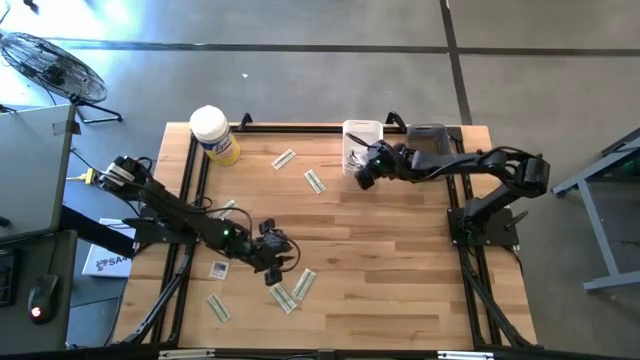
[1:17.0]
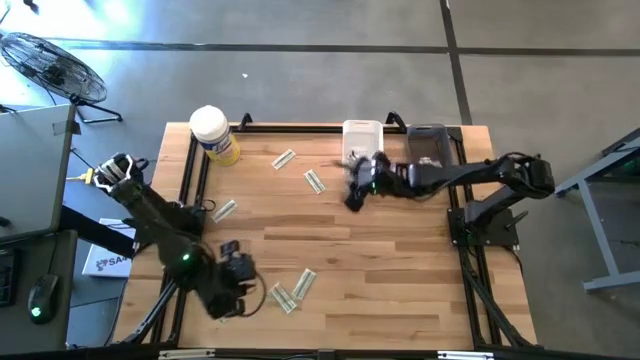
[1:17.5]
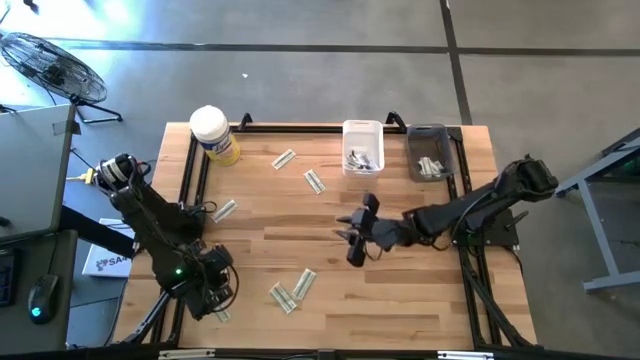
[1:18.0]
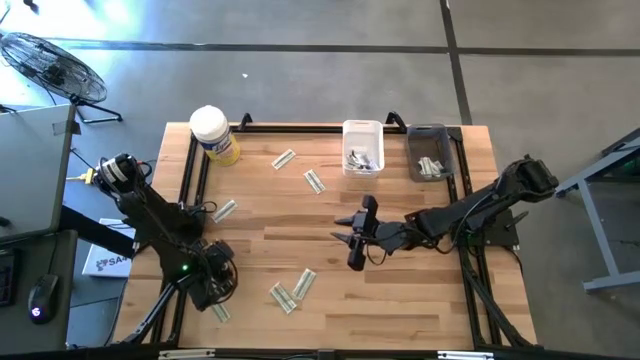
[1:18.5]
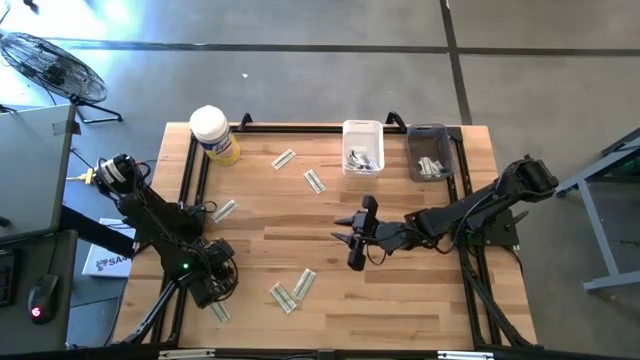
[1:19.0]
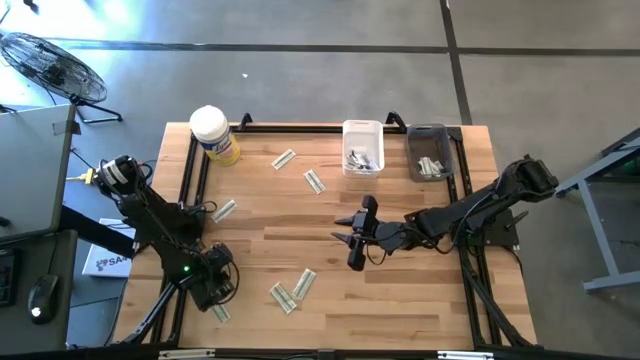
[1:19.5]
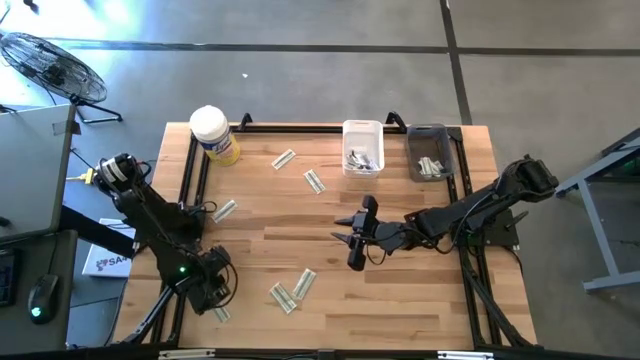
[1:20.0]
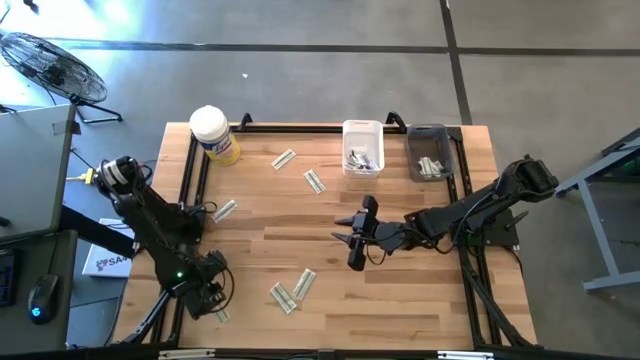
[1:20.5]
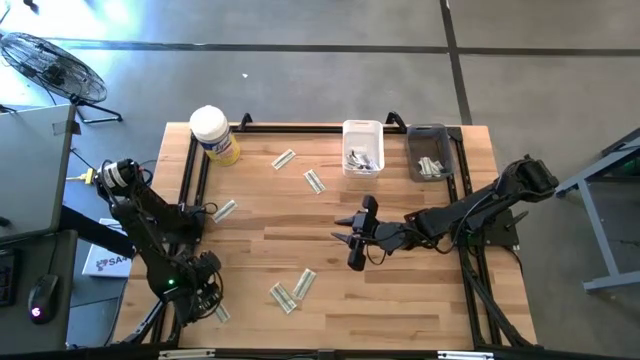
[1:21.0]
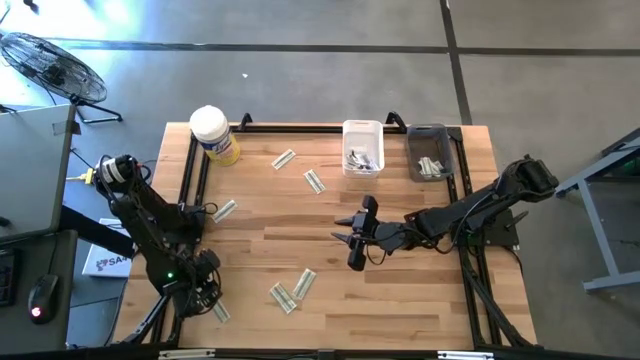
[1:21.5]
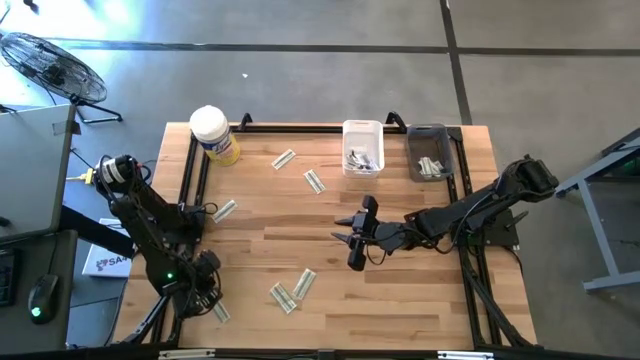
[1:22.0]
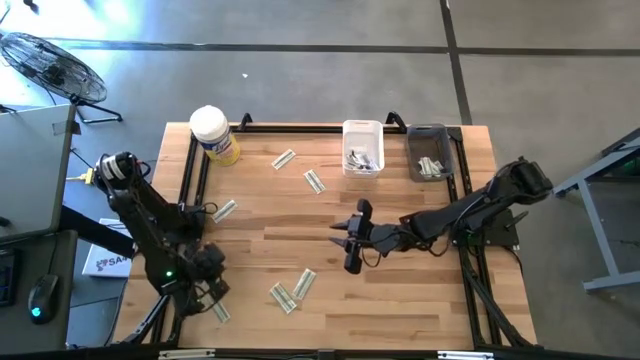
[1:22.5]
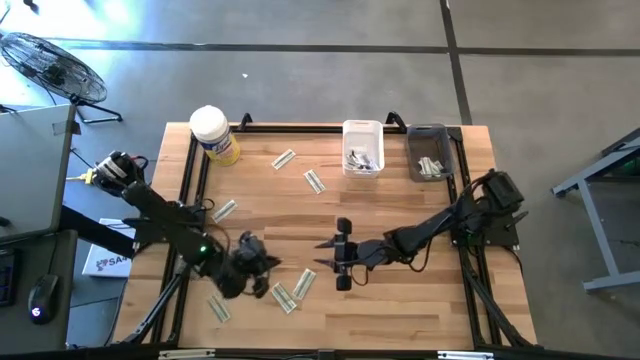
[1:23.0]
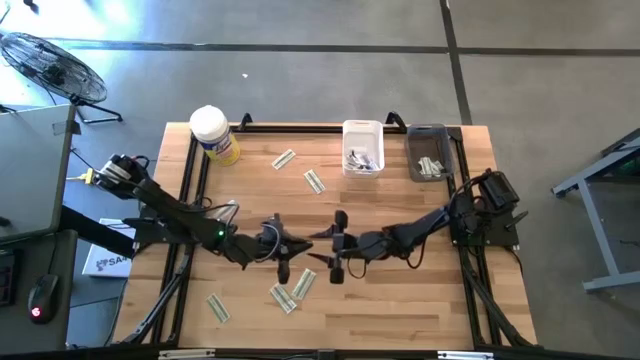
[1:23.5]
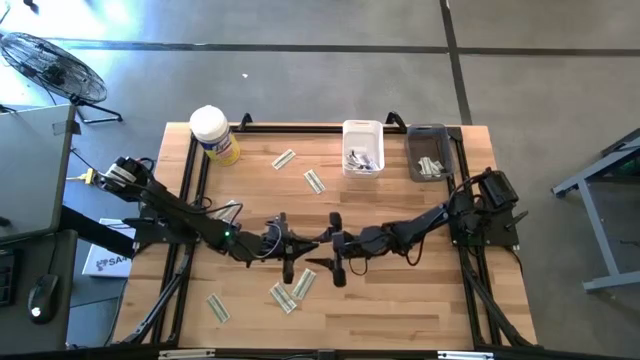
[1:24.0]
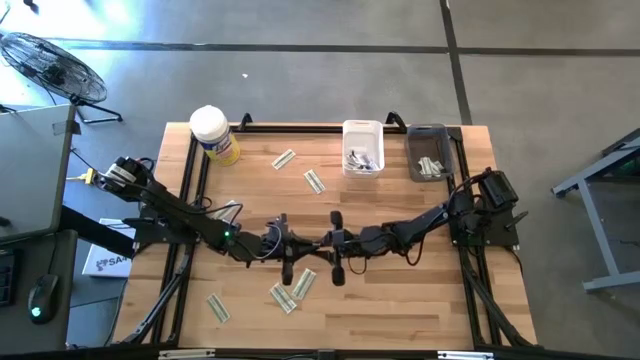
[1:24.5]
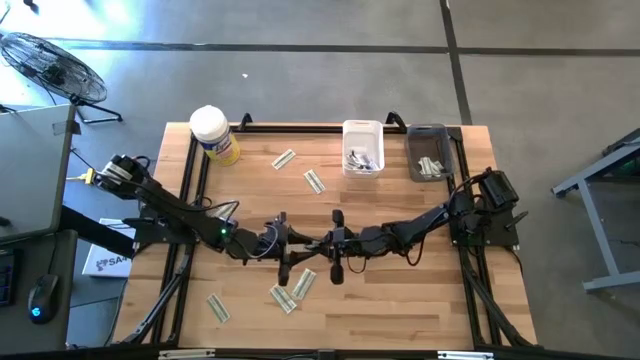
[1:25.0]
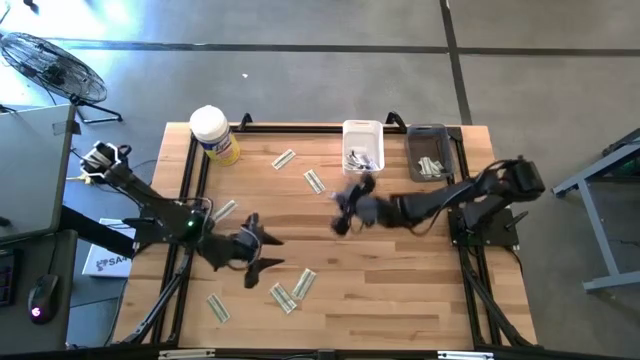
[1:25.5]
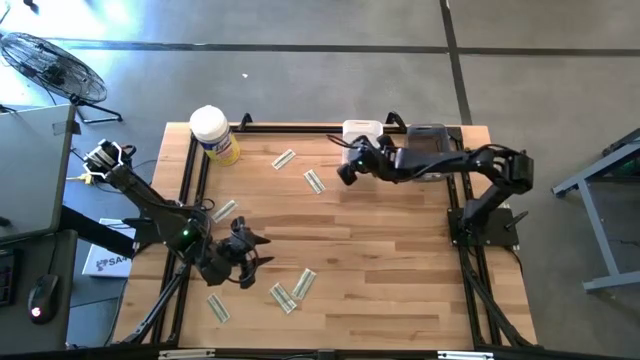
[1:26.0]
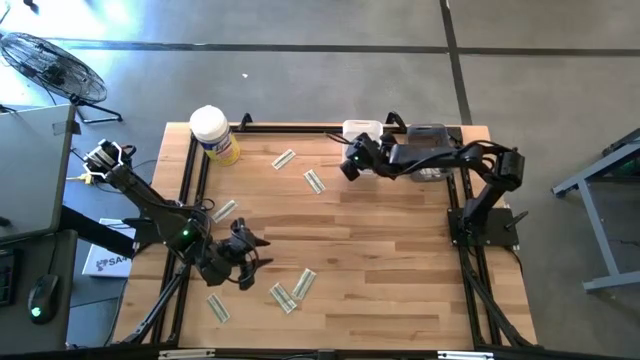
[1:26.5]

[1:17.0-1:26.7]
Task: Pick & Place First Aid Supplies
Put the blue alcohol pad into the white bin

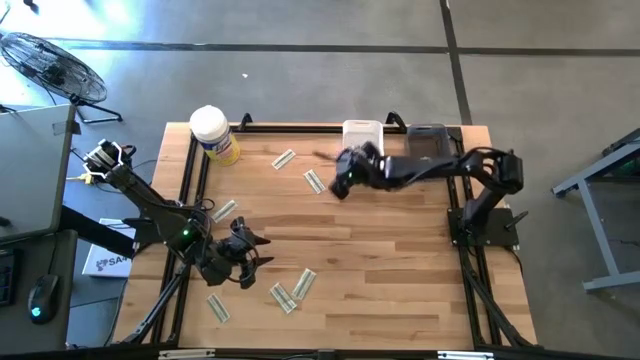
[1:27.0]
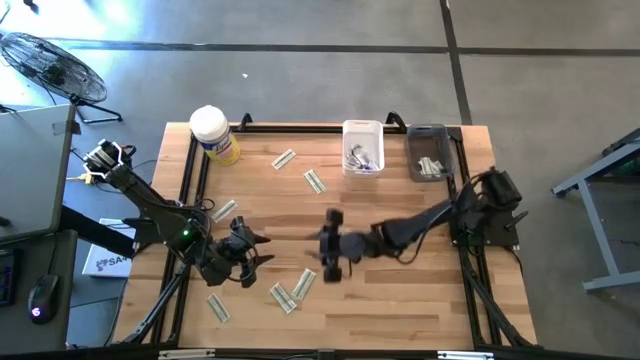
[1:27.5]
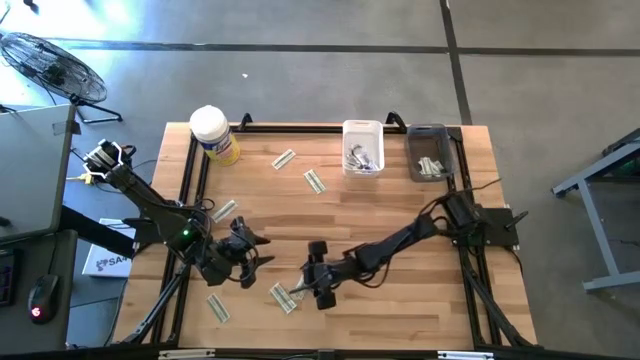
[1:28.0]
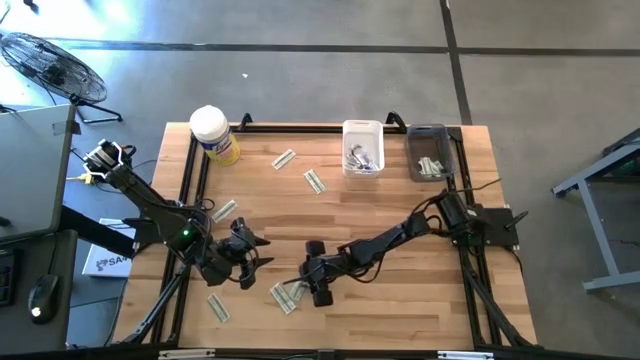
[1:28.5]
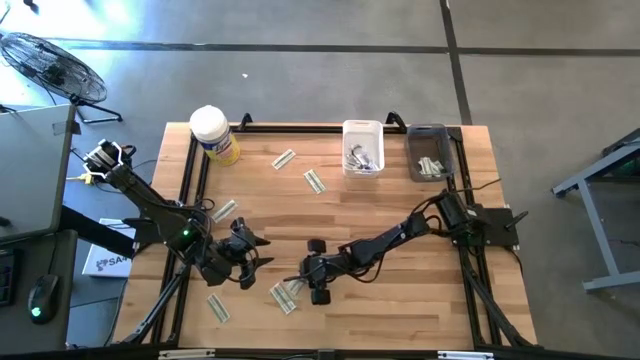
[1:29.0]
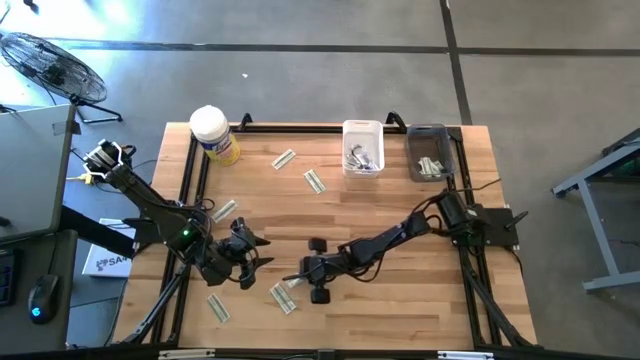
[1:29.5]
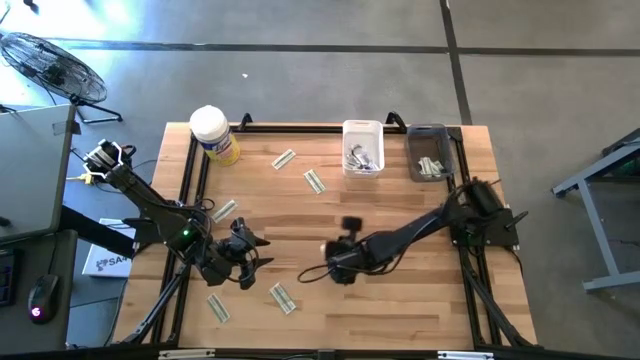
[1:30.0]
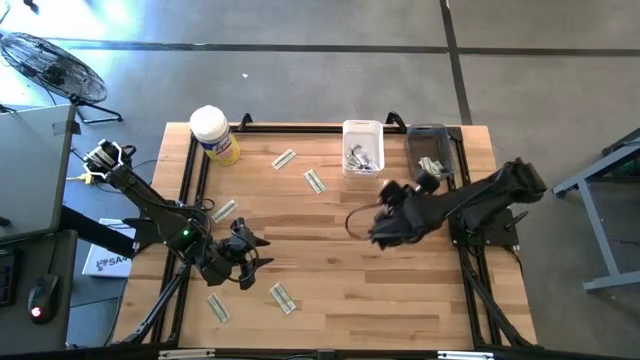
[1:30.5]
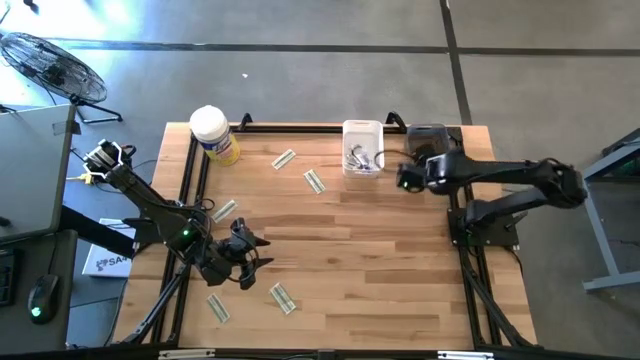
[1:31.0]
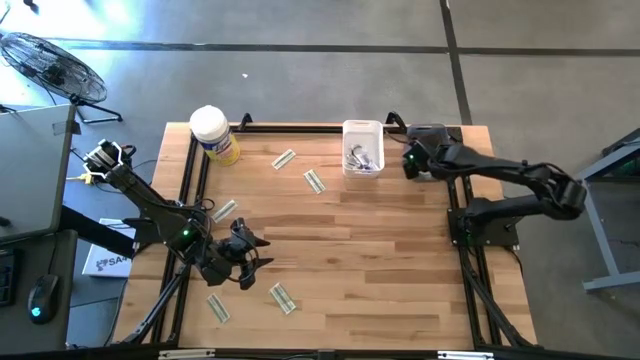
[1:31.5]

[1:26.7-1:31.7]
Put the green bandage into the black bin

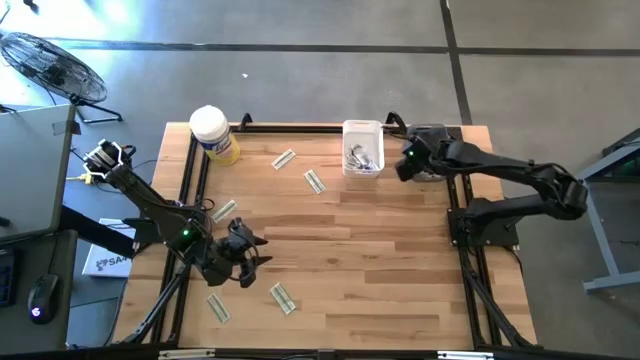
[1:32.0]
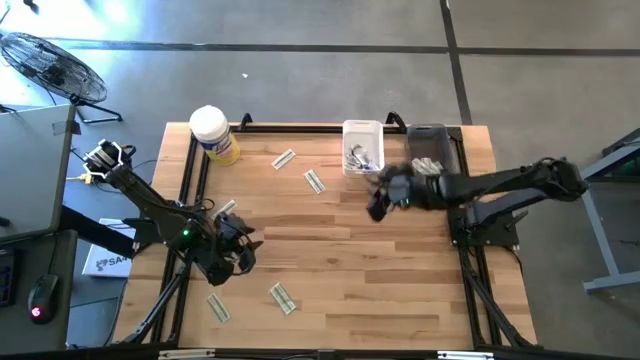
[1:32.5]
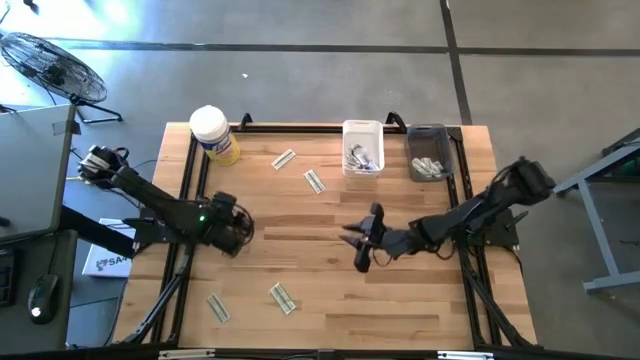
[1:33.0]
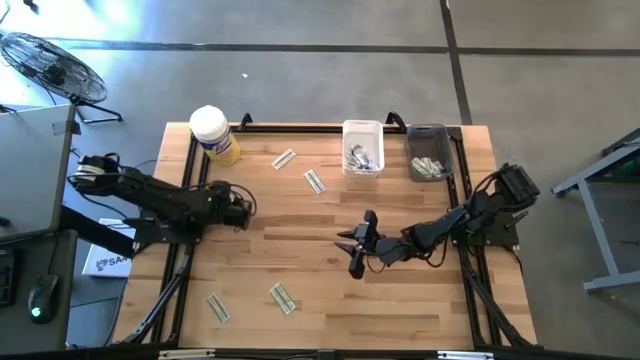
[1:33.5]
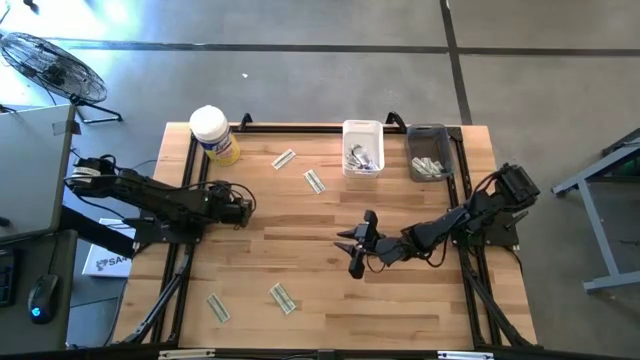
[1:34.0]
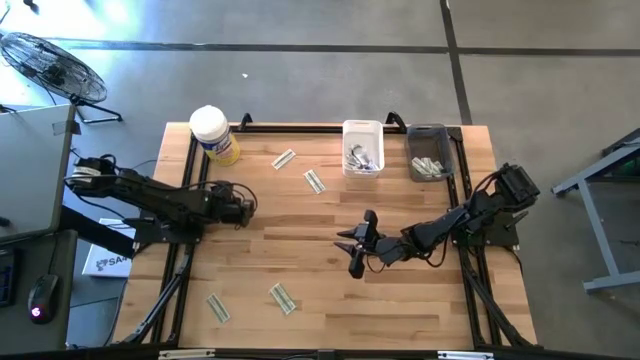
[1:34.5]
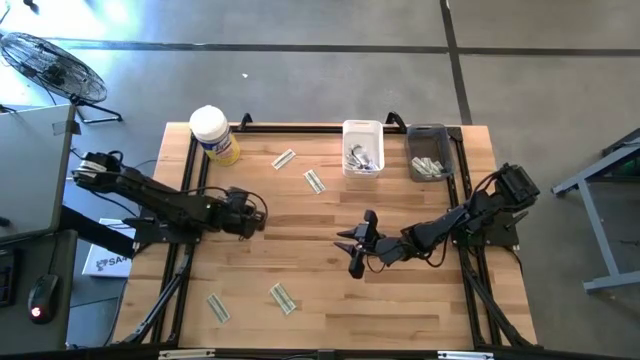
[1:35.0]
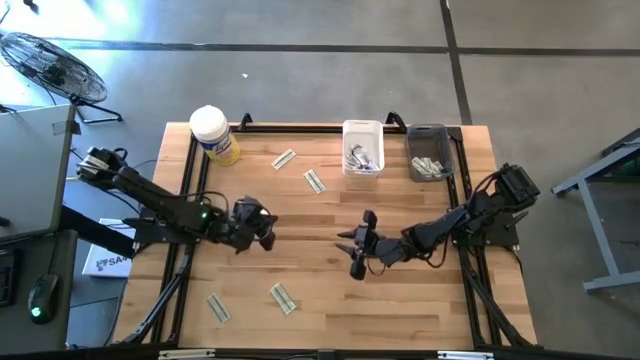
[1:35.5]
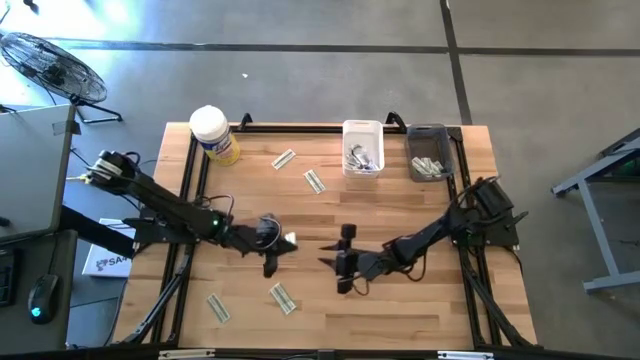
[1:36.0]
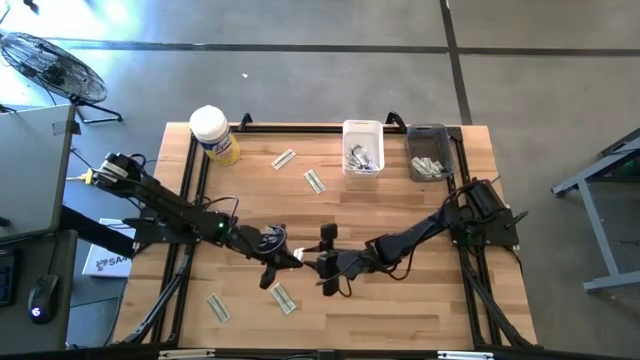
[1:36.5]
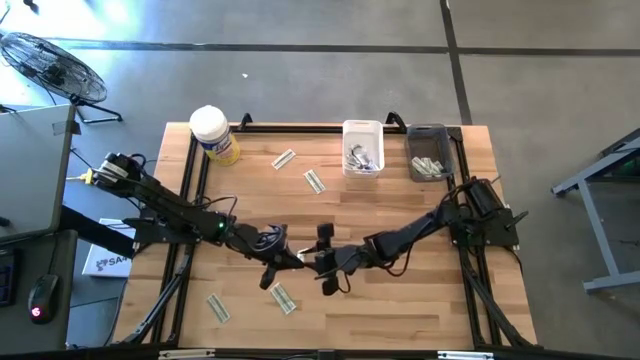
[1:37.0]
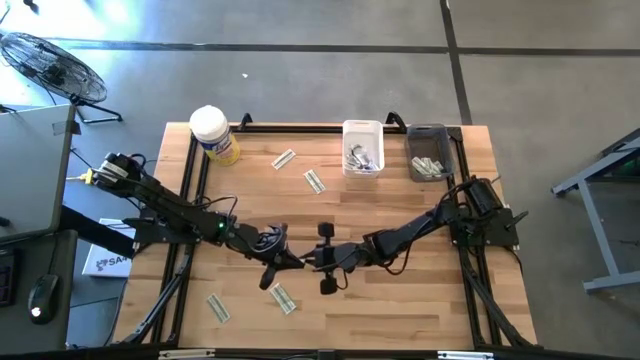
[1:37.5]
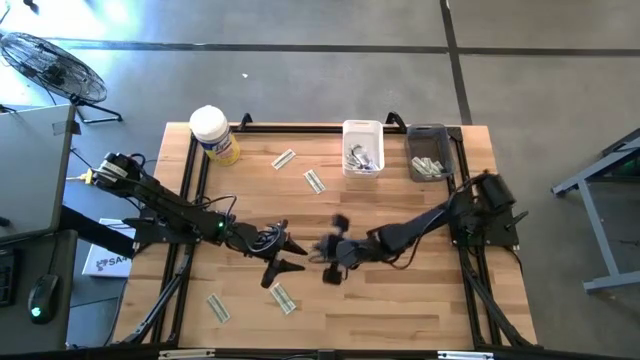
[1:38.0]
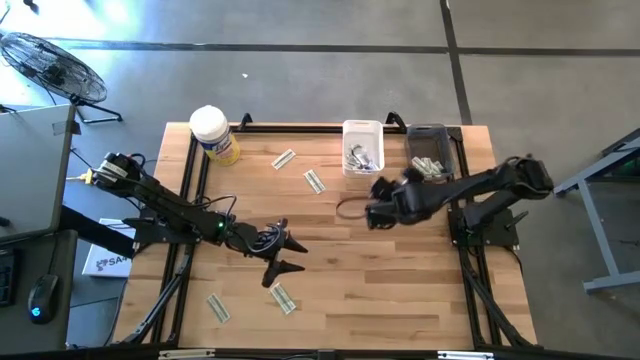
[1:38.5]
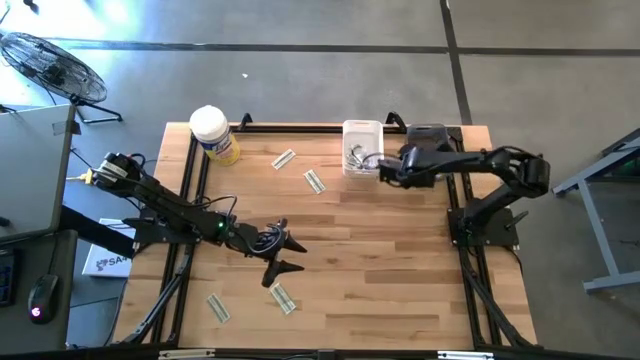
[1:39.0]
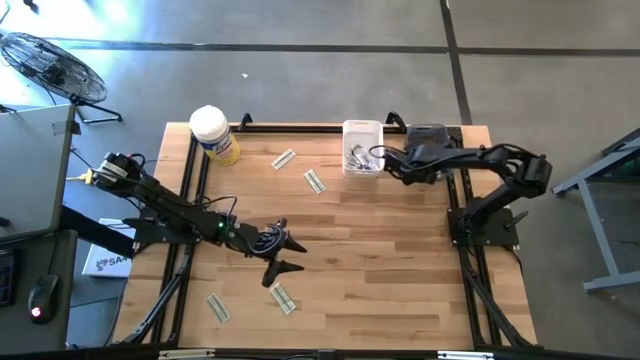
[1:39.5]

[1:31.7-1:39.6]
Put the green bandage into the black bin
